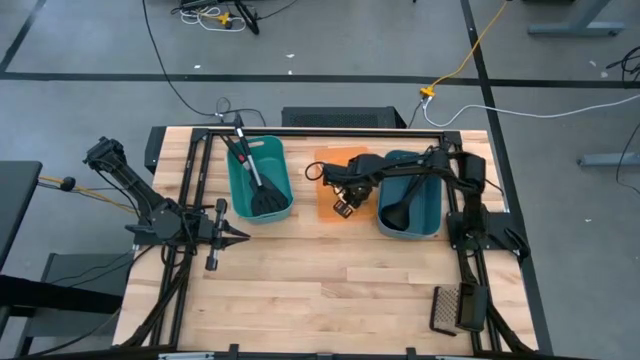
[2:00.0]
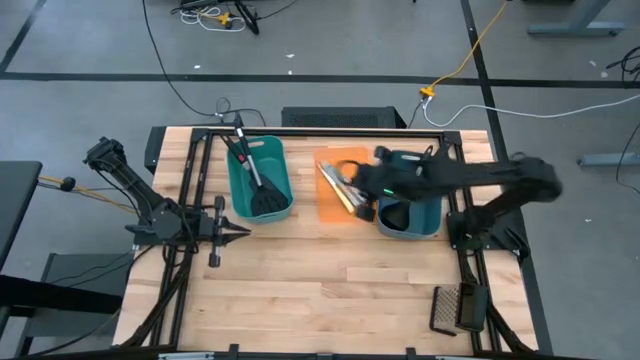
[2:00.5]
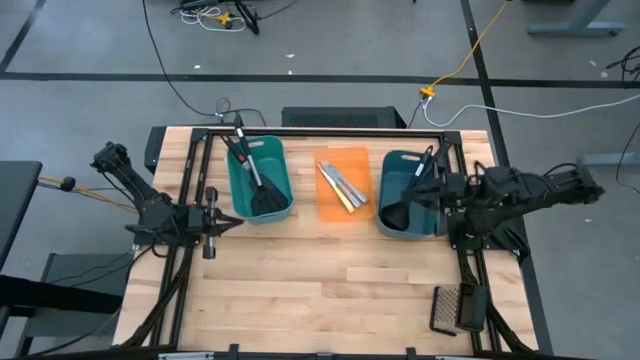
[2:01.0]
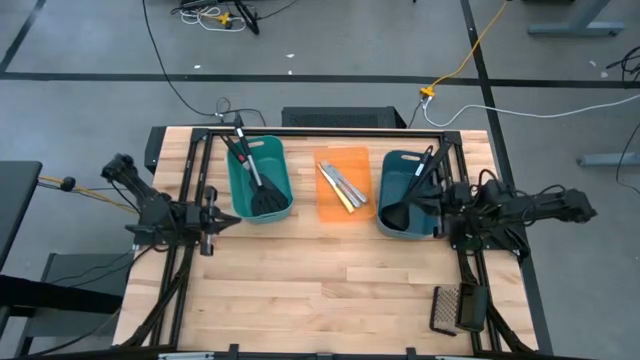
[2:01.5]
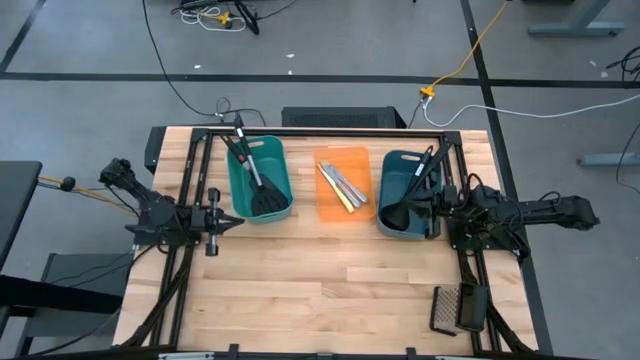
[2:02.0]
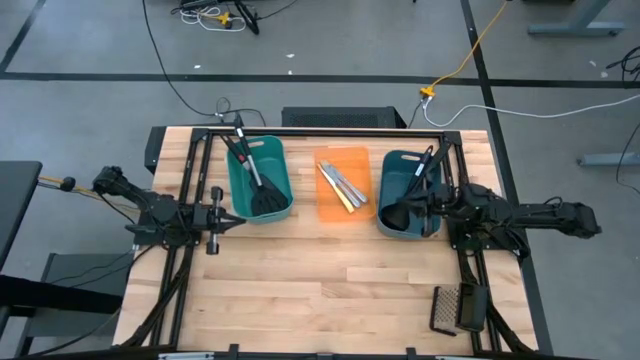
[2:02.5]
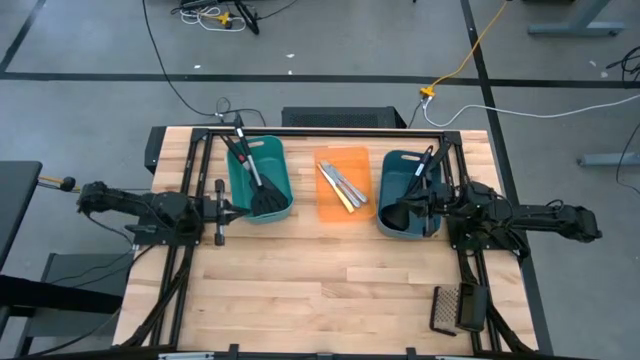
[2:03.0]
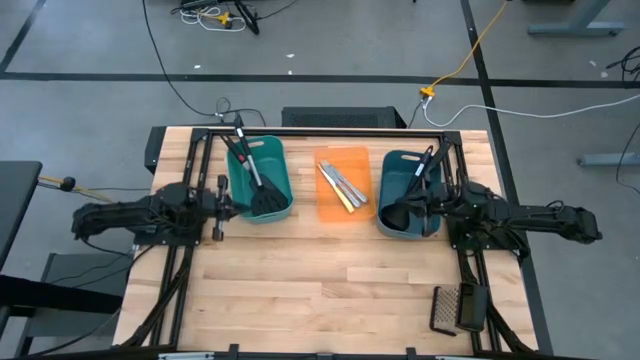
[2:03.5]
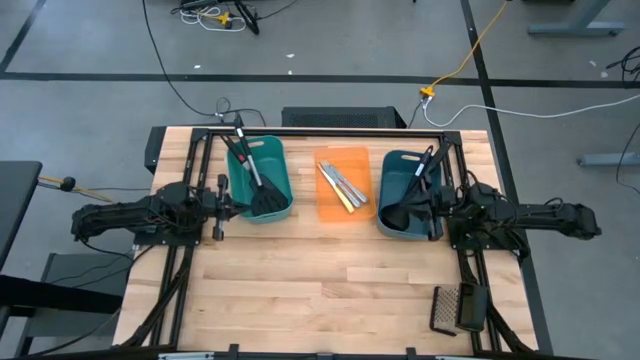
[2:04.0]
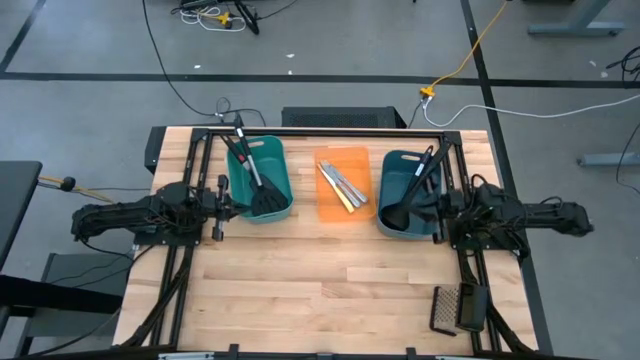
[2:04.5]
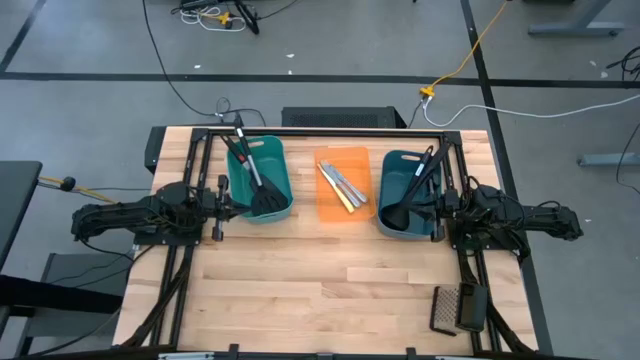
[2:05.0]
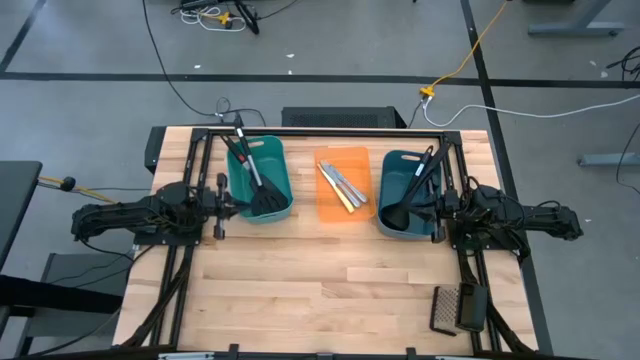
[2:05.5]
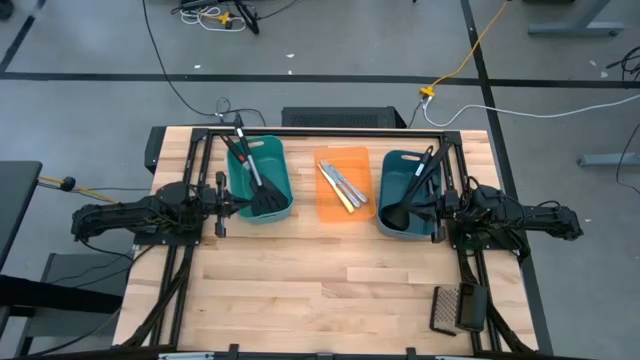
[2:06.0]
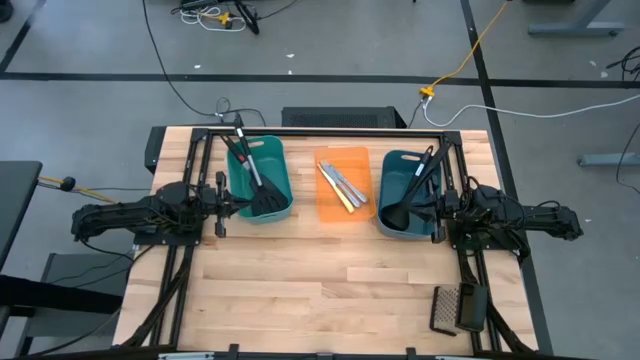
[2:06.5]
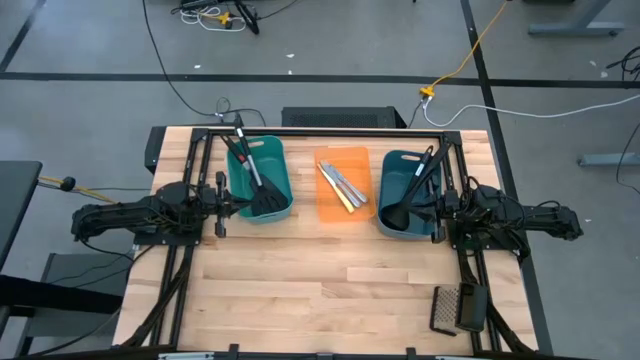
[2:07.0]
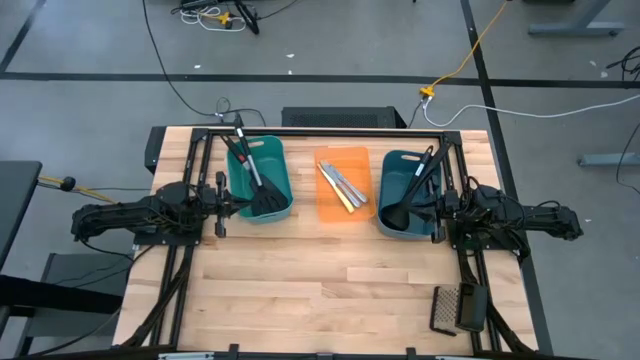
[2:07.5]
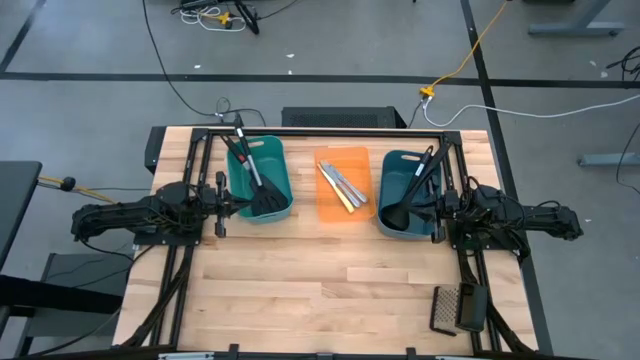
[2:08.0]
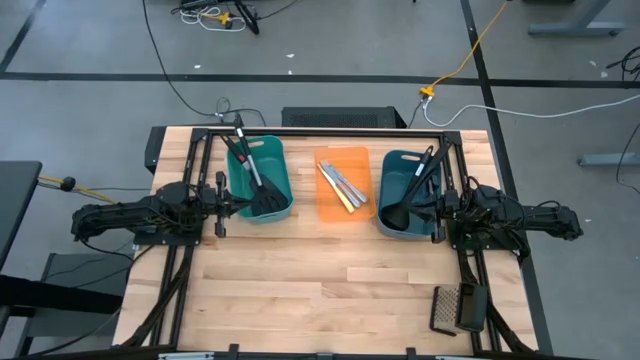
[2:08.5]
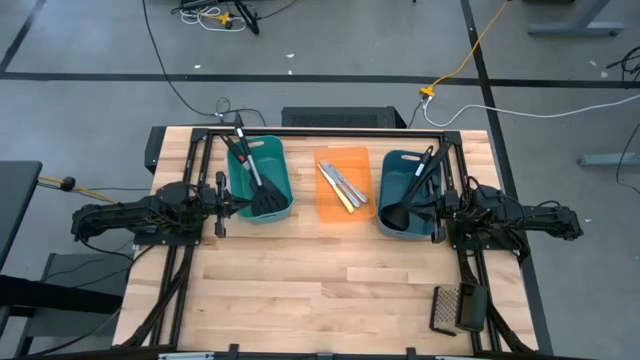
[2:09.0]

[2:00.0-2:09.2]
Task: Pick & Place Kitchen Items
Return to home position

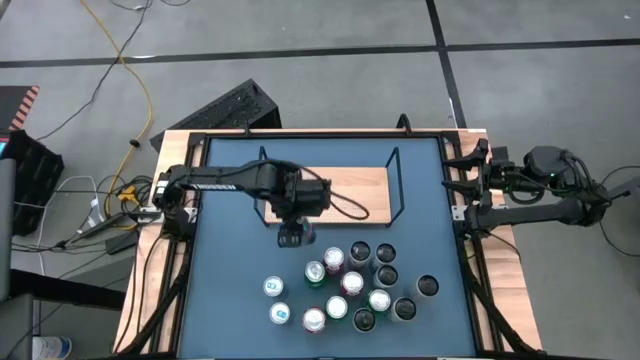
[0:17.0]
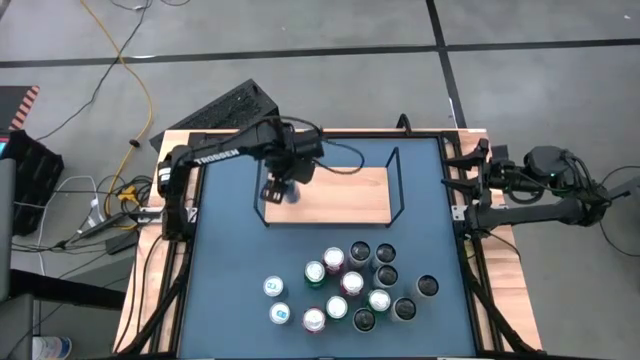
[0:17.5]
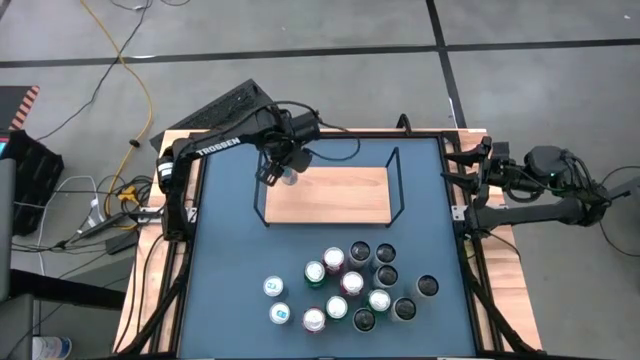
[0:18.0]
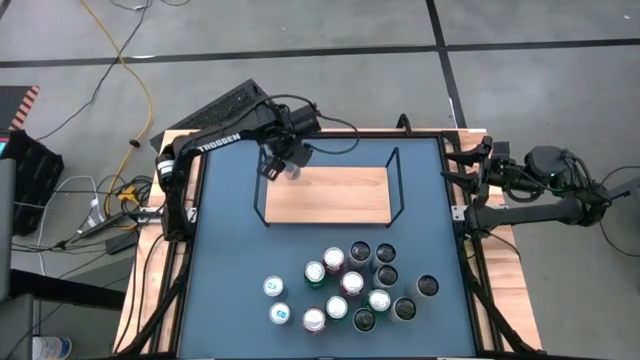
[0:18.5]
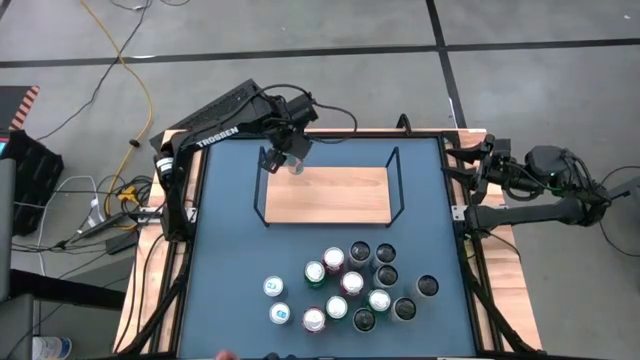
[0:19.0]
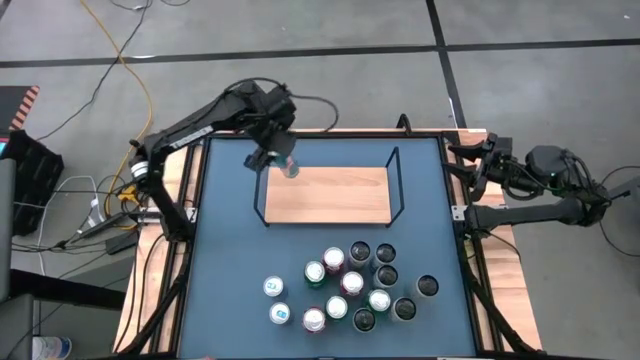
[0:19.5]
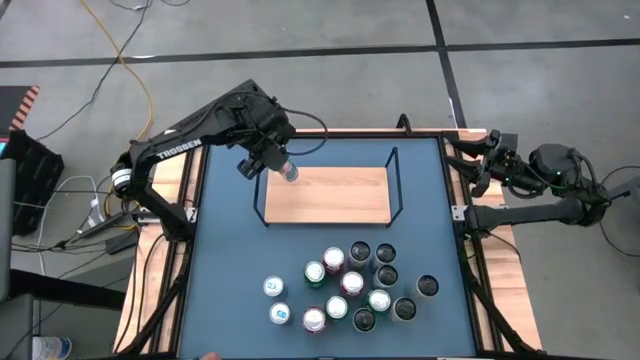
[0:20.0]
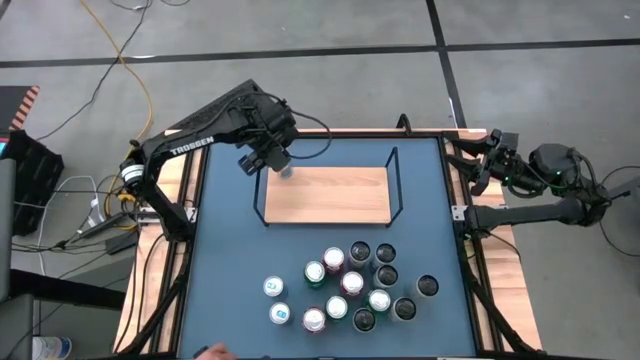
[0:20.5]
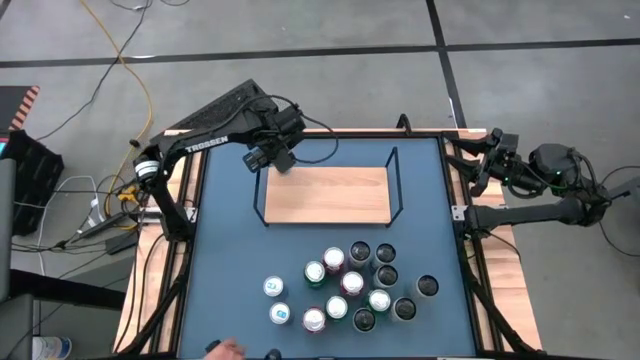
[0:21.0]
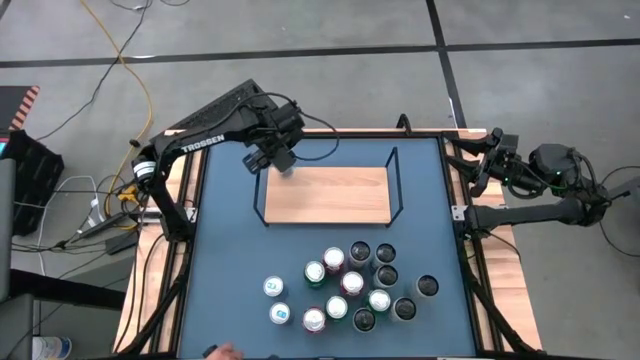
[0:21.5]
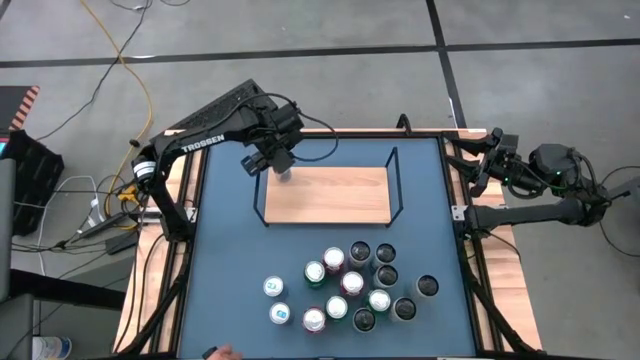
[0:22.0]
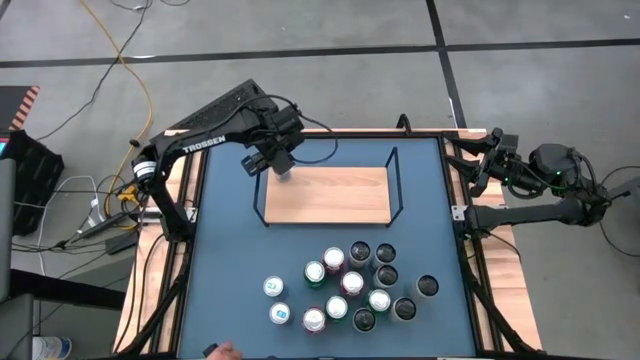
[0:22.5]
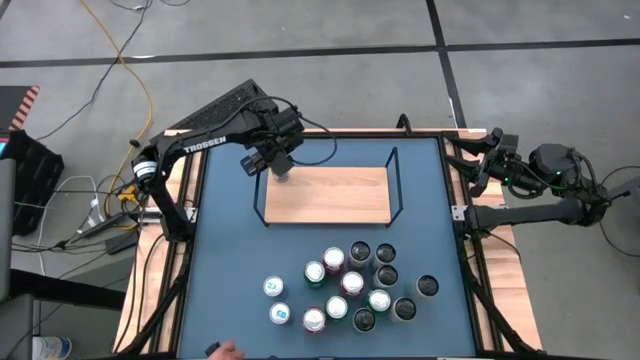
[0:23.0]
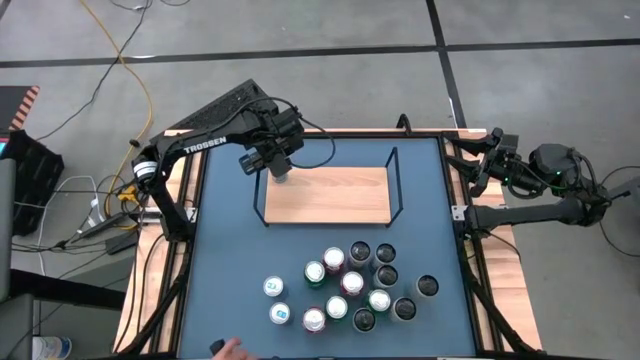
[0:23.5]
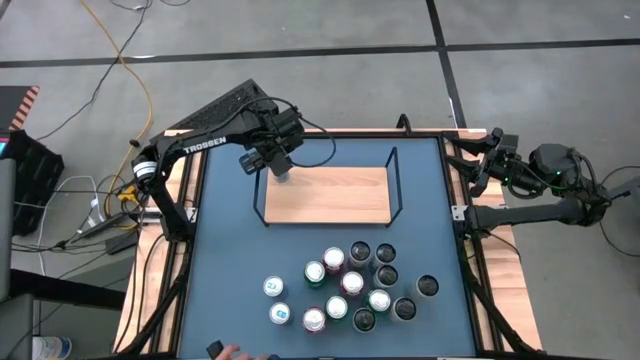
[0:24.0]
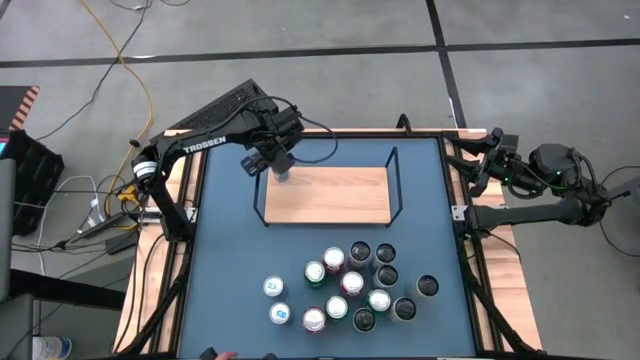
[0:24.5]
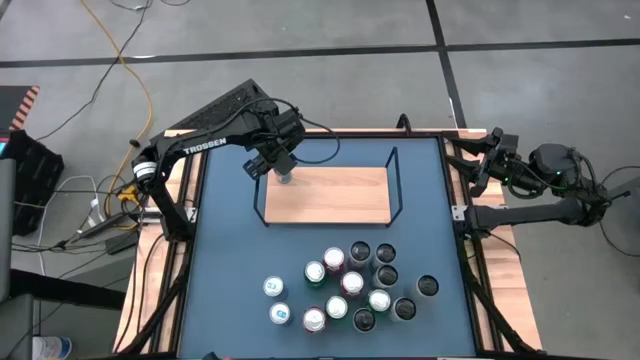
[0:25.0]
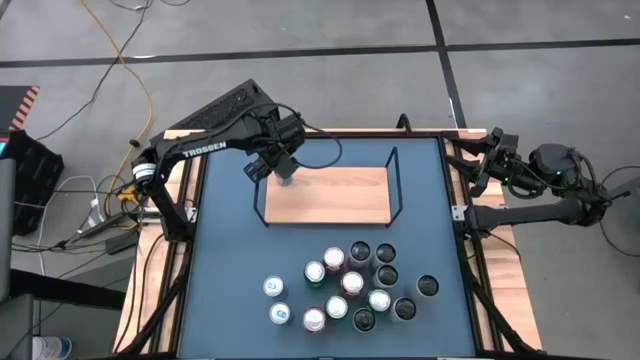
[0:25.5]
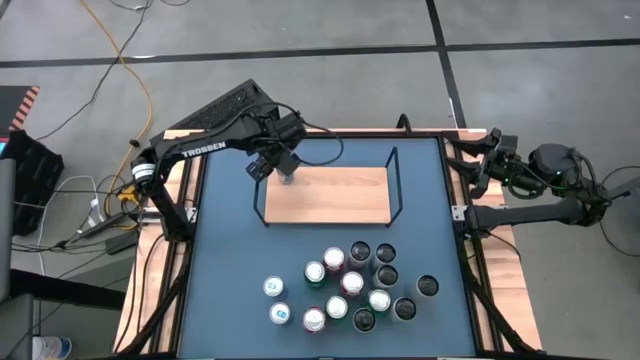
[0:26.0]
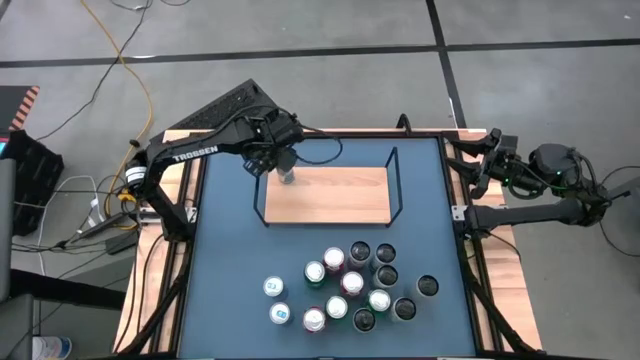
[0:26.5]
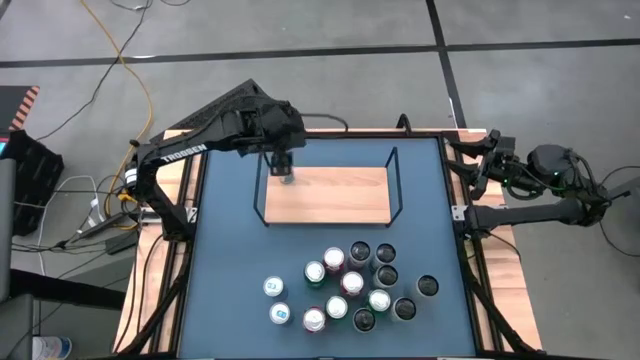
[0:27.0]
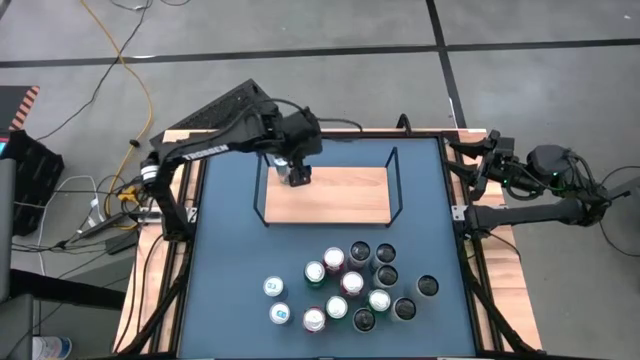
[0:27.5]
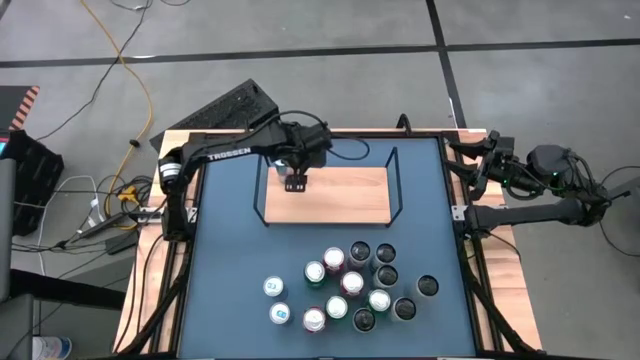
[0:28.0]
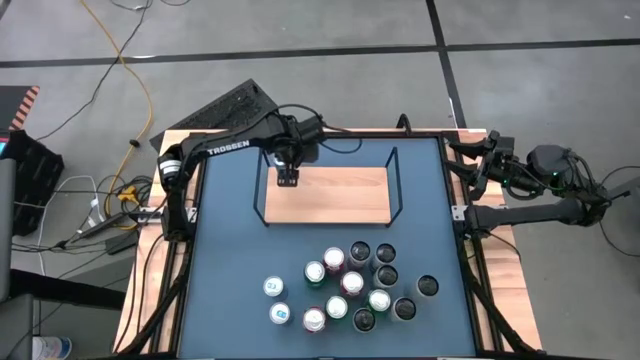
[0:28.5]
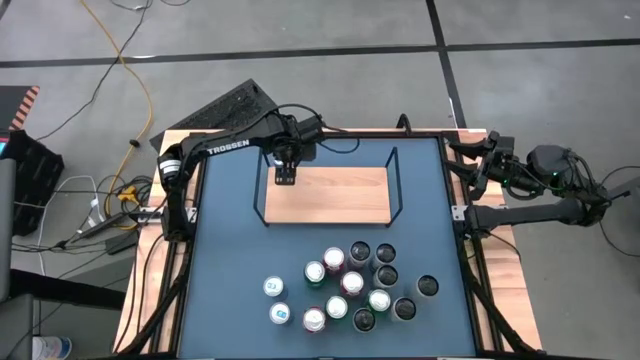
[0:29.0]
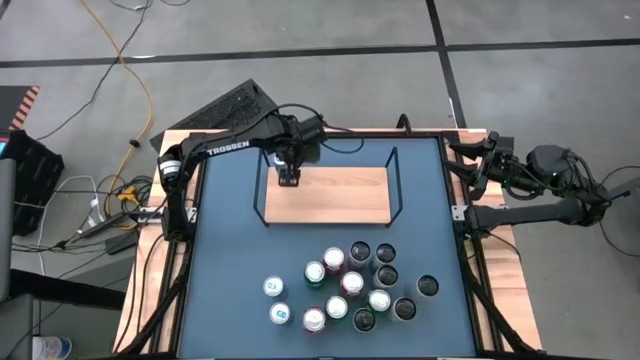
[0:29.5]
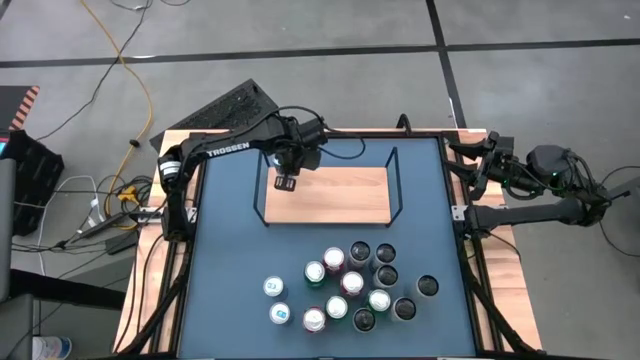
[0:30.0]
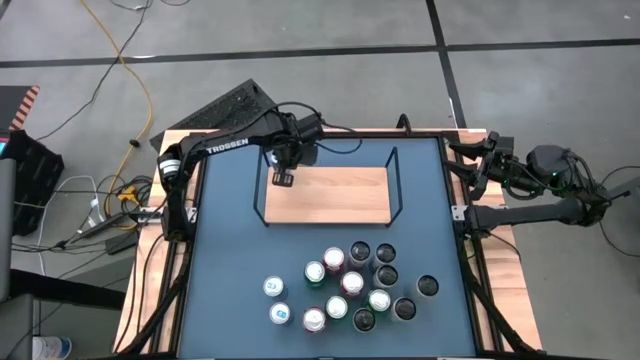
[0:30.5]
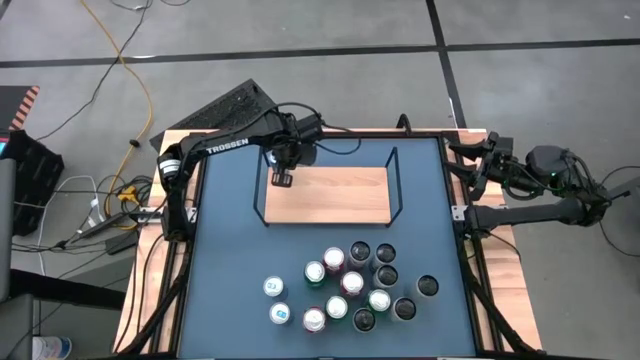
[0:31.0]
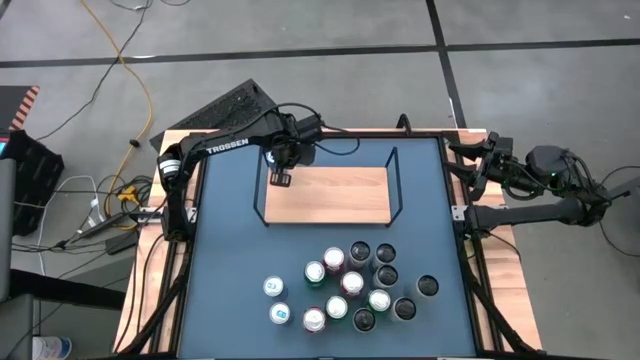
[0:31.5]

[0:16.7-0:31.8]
Task: Place canned beverage on shelf
Put the top blue soda can on the shelf
